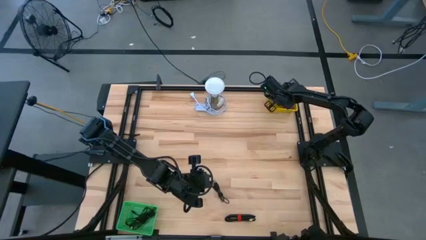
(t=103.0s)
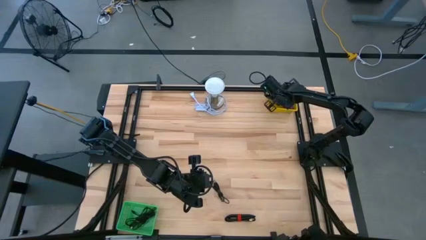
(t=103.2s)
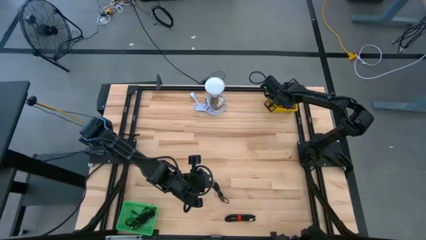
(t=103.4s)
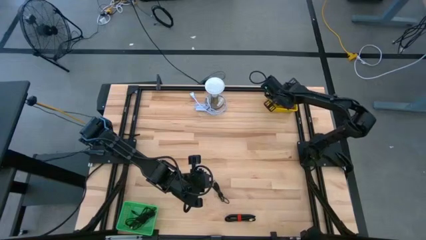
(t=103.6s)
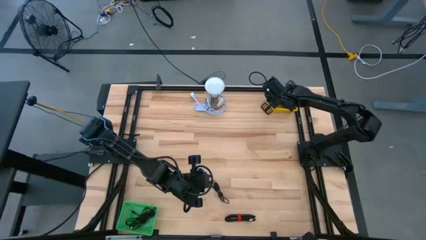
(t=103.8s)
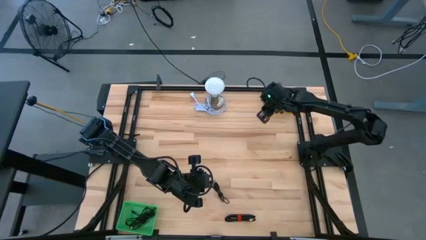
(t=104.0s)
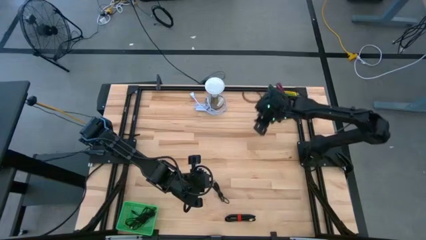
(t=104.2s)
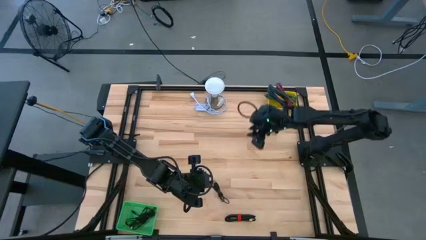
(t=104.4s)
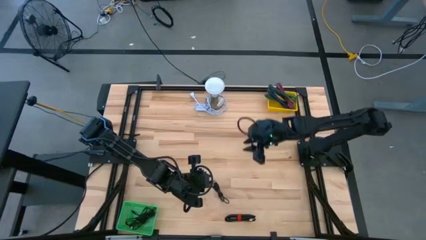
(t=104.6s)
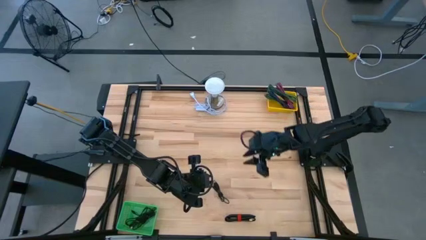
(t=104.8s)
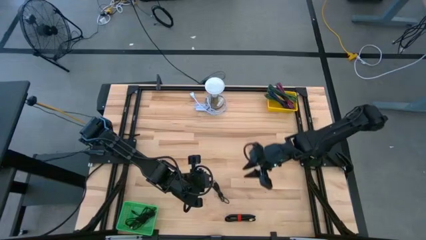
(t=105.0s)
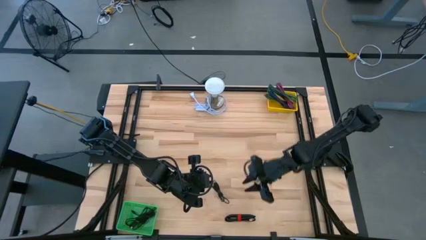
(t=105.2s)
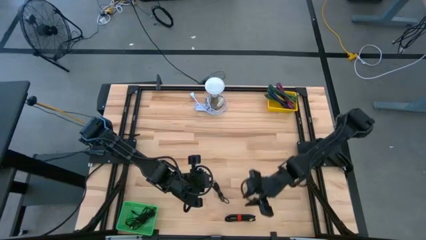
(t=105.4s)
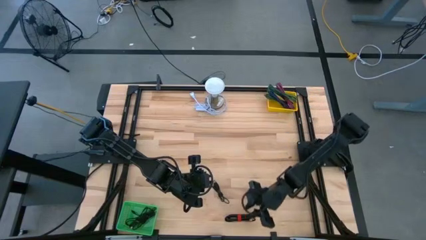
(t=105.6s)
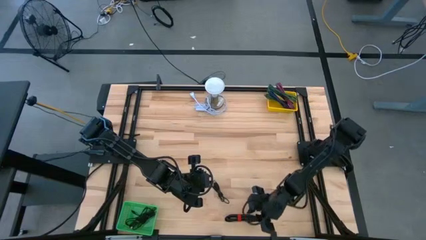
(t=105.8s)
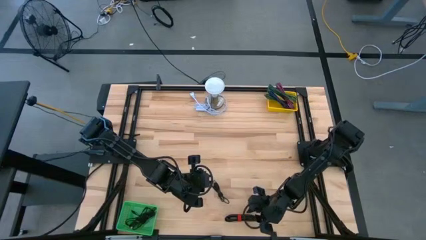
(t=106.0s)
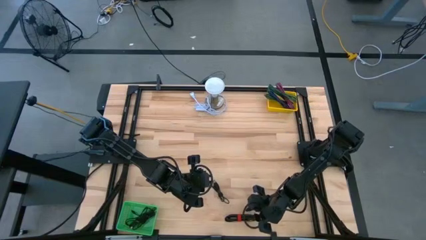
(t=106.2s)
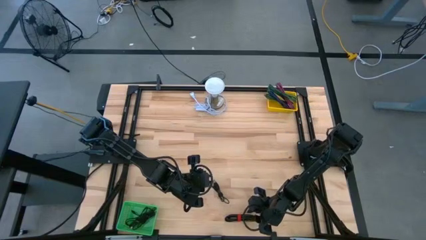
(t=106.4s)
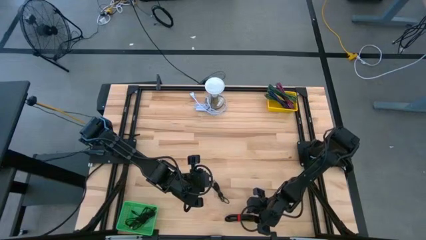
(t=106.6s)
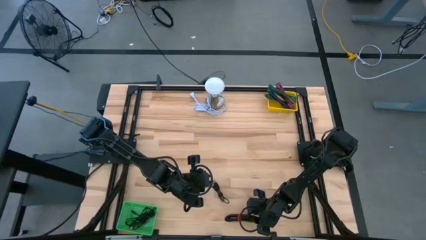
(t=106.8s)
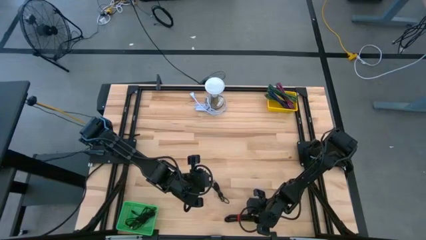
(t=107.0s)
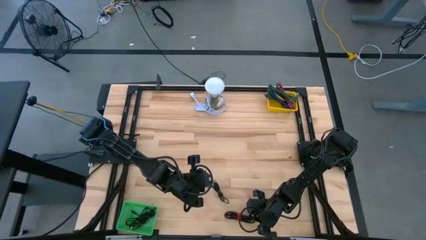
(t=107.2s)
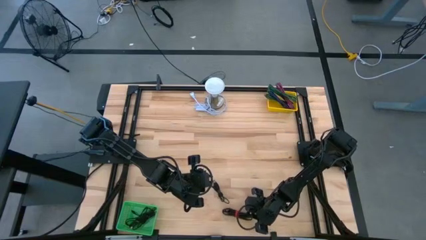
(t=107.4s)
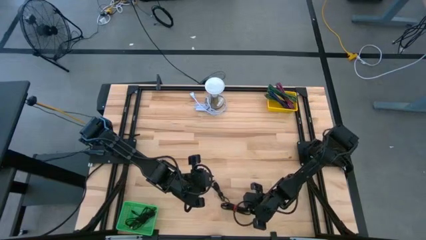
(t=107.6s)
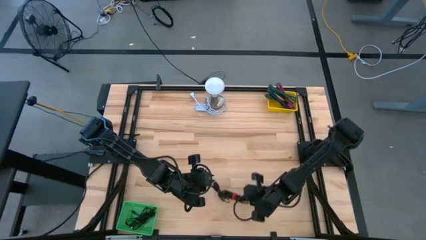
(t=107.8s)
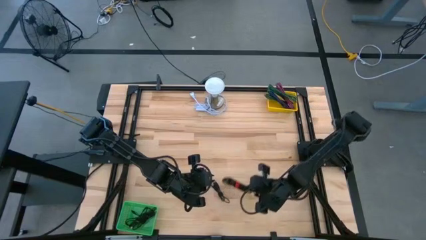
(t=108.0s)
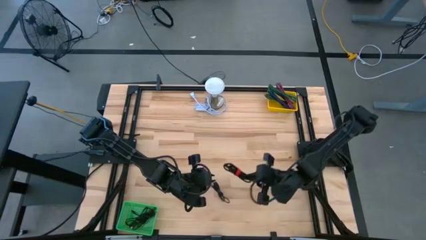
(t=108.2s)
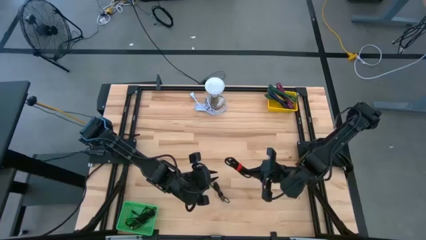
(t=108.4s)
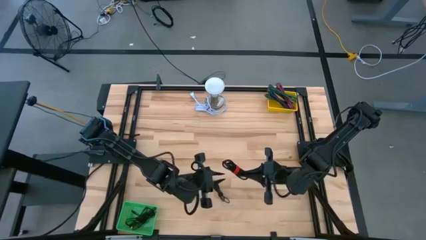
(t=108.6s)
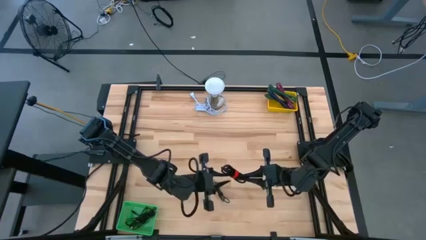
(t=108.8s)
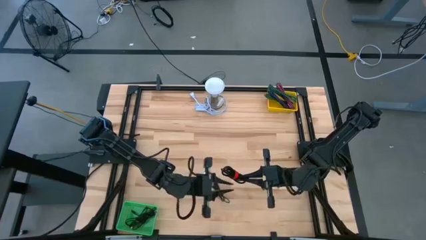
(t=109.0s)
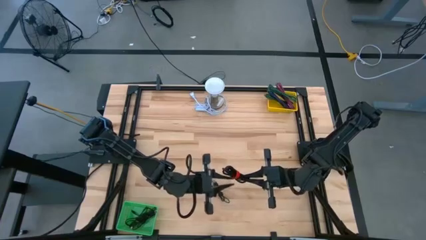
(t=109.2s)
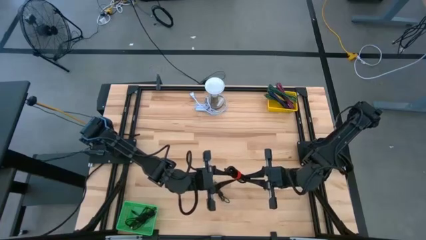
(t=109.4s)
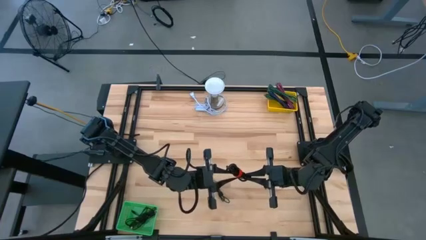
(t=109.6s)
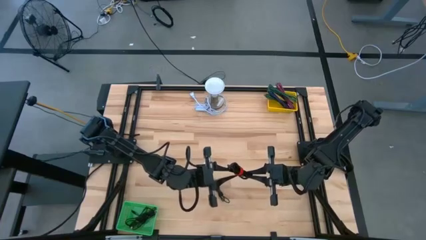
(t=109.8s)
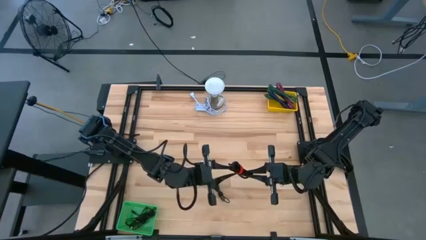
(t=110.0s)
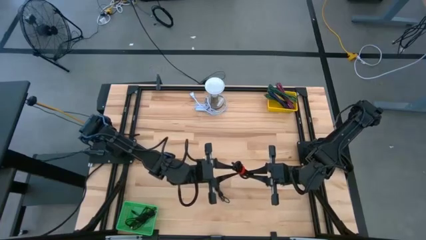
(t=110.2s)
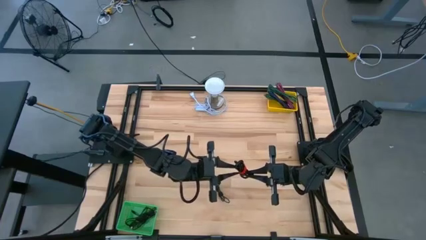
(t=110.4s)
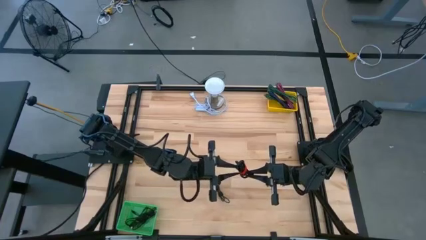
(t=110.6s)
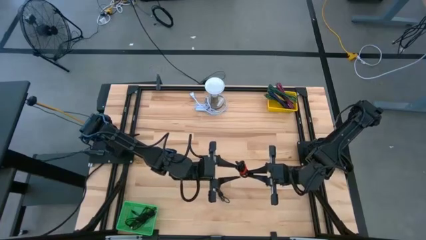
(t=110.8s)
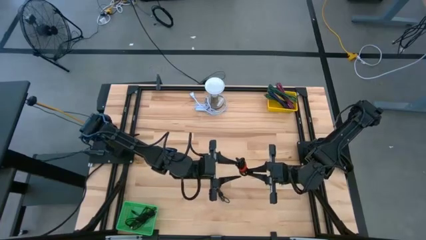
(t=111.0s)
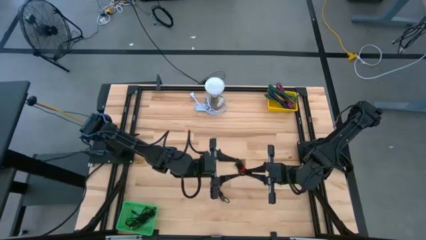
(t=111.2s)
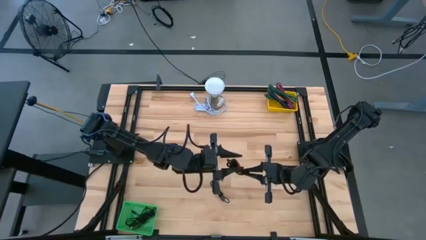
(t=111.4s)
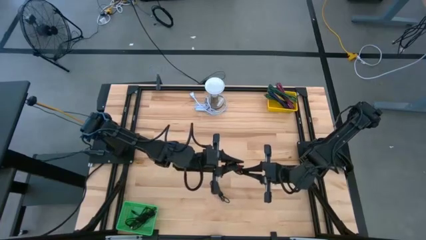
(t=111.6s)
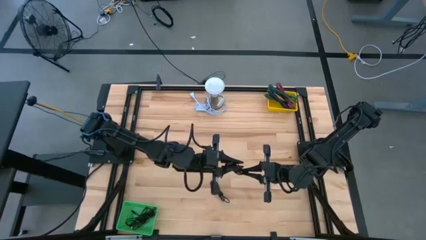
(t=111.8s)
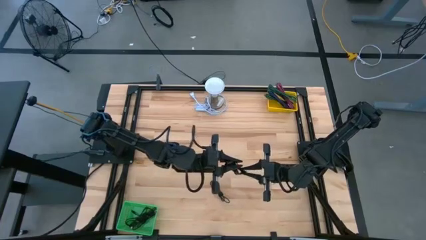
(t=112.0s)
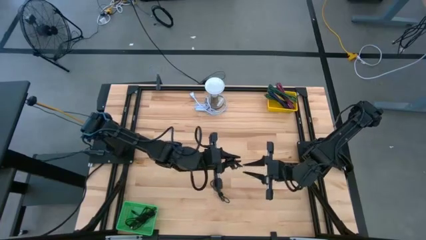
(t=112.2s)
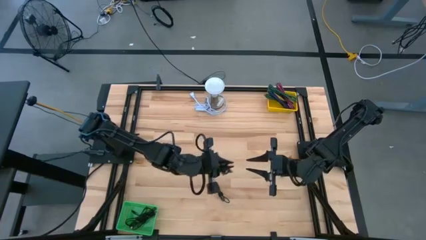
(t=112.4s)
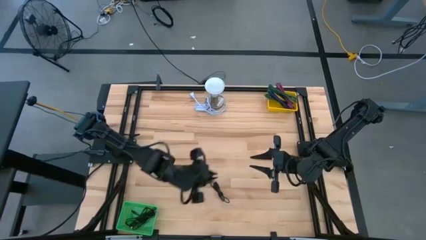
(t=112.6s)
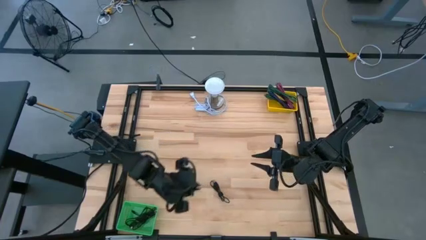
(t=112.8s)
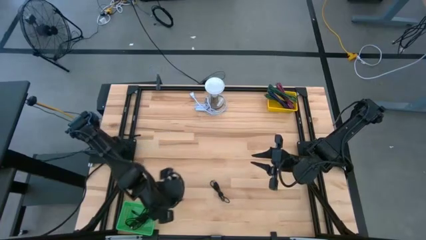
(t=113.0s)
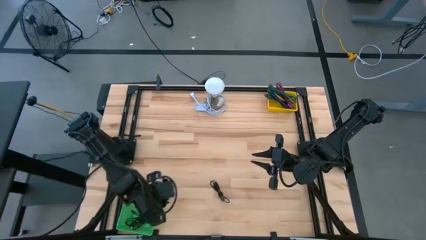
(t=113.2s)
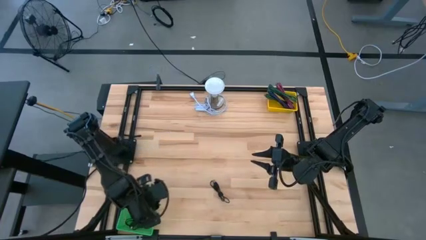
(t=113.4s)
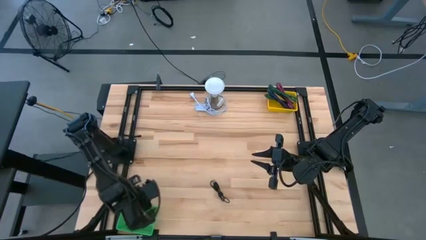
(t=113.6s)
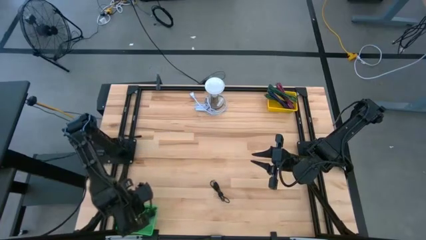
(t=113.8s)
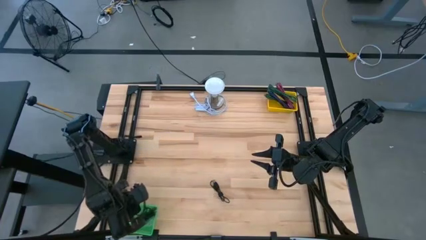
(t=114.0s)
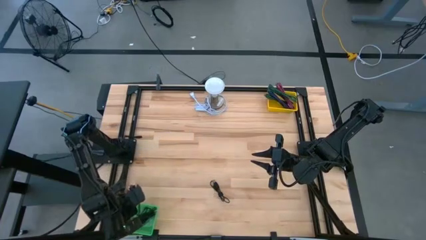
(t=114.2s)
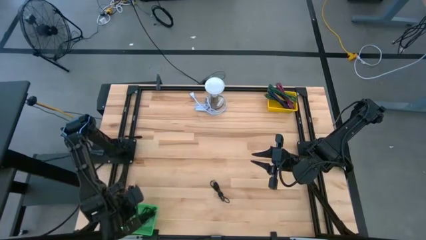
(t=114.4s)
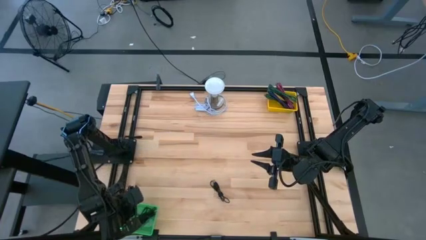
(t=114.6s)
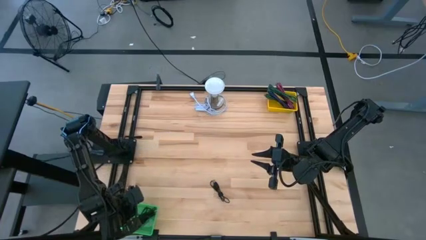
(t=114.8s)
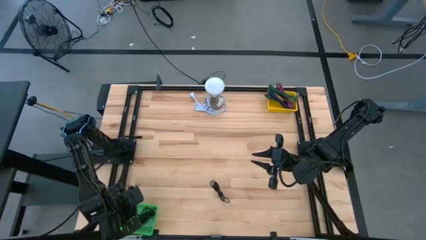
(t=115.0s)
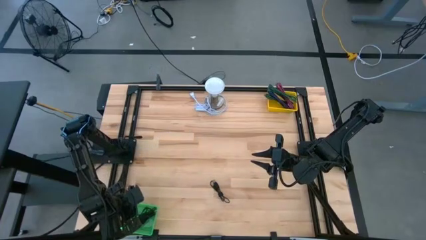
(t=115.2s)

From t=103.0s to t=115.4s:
Task: Pick & Place USB Port
Put the black USB cable into the green bin

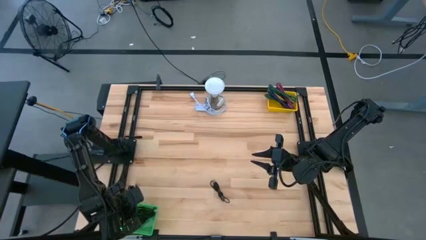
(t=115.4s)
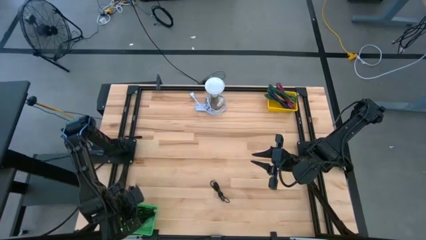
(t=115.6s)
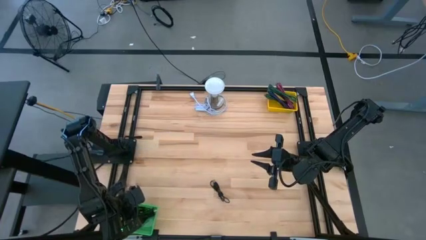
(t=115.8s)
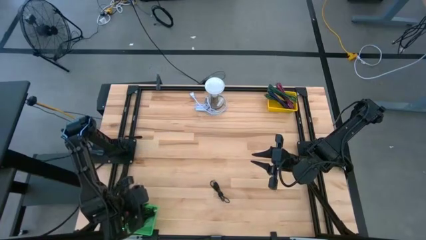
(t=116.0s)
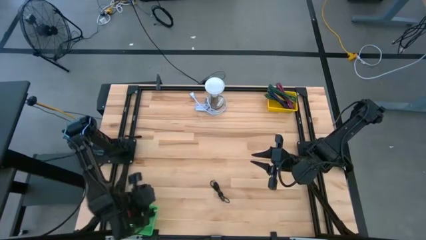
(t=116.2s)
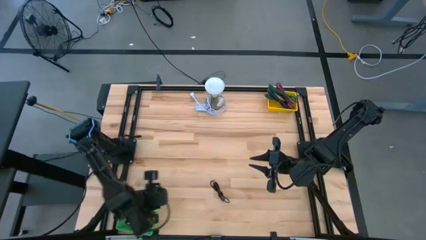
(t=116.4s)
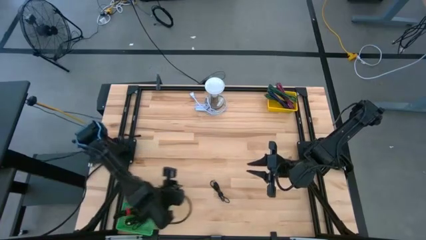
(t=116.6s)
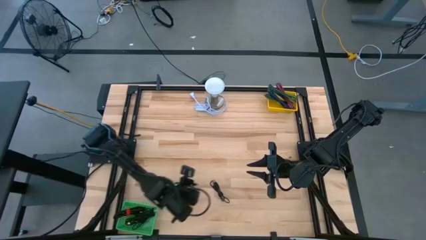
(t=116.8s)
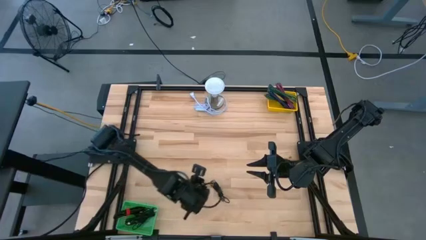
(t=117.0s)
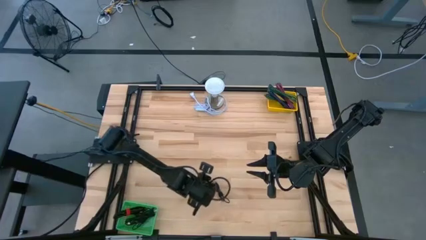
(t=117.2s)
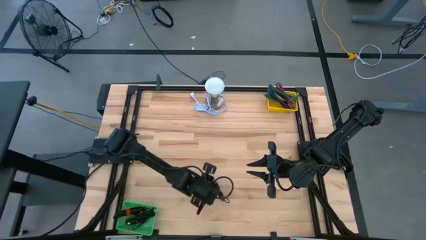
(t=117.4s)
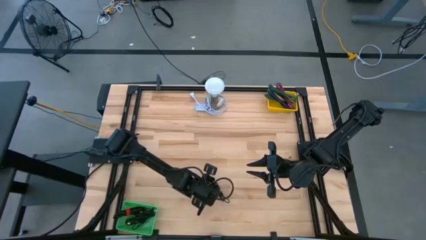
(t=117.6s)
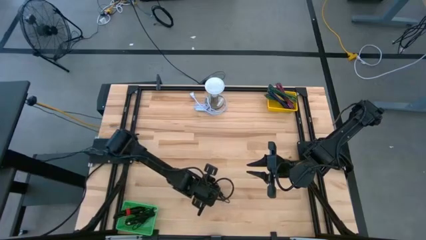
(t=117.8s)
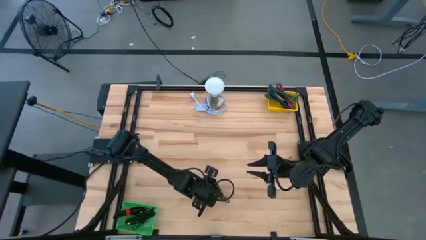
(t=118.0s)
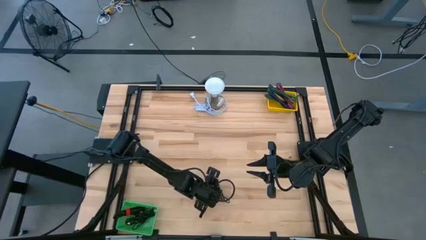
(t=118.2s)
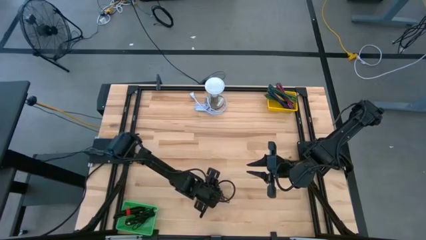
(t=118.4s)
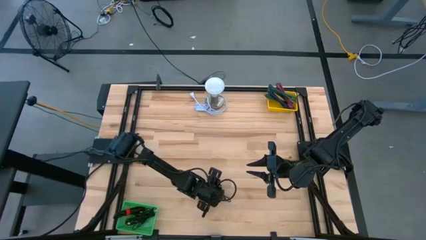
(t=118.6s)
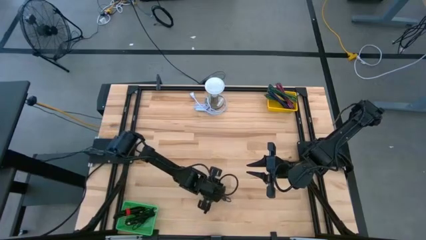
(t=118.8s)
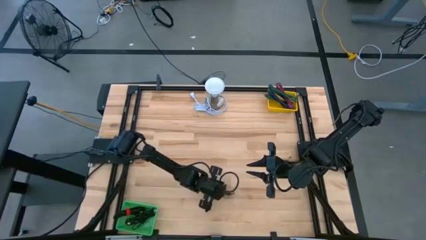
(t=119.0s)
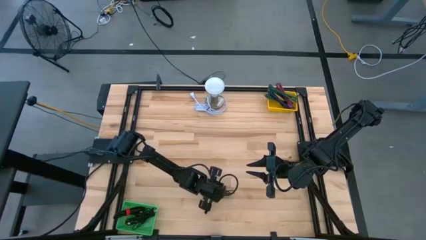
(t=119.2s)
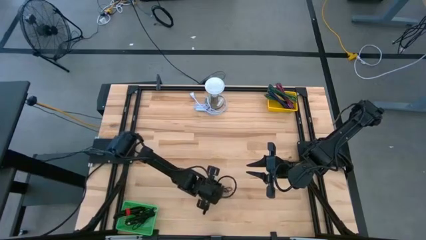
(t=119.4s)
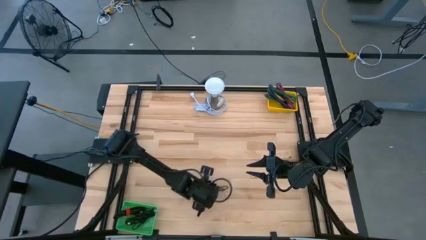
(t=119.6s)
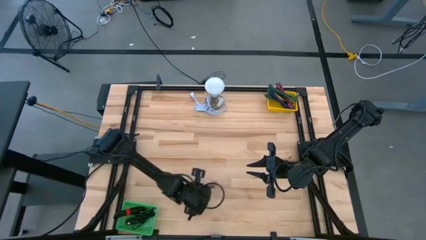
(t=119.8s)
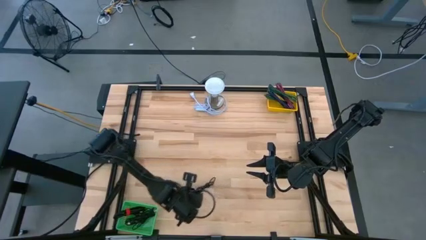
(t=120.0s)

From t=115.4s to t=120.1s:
Put the black USB cable into the green bin
